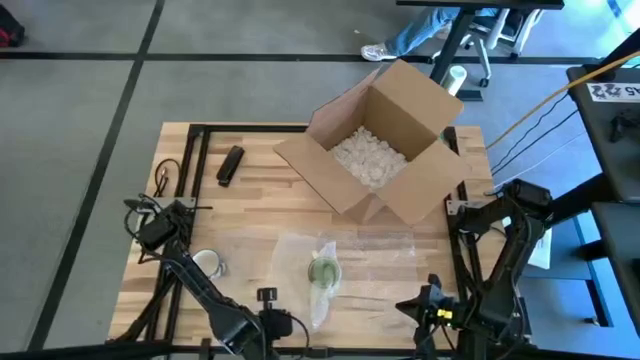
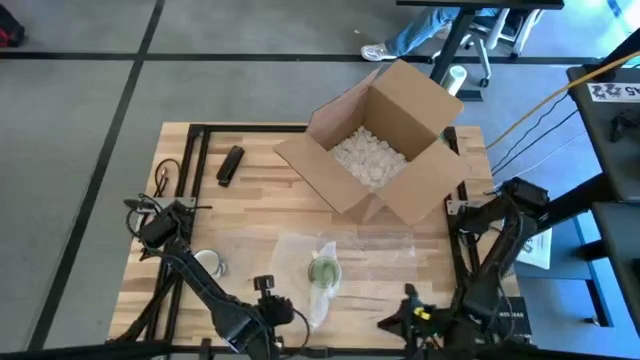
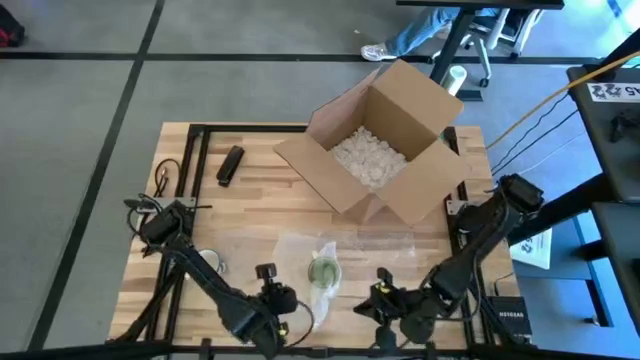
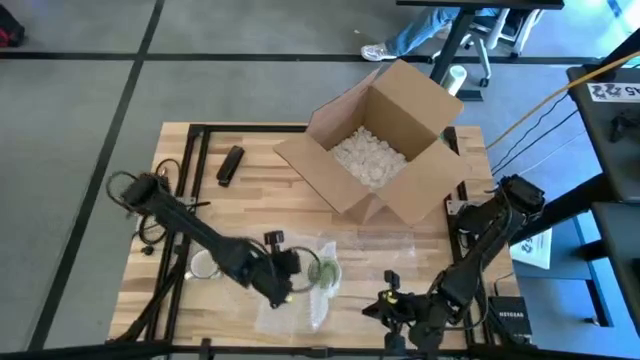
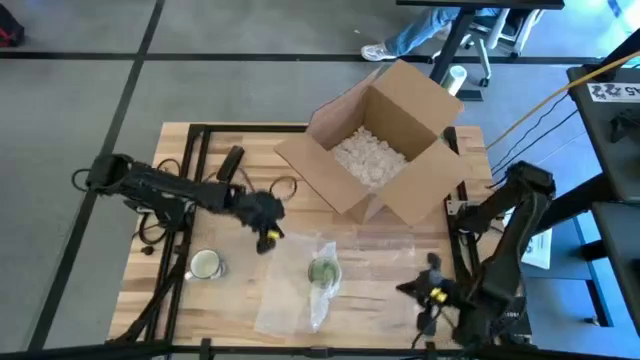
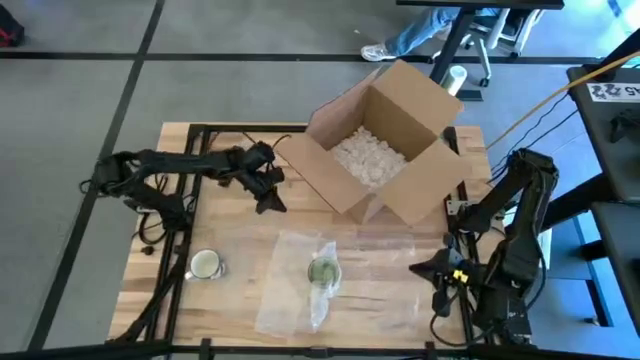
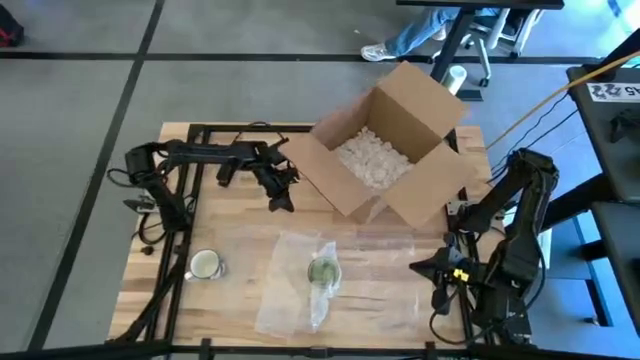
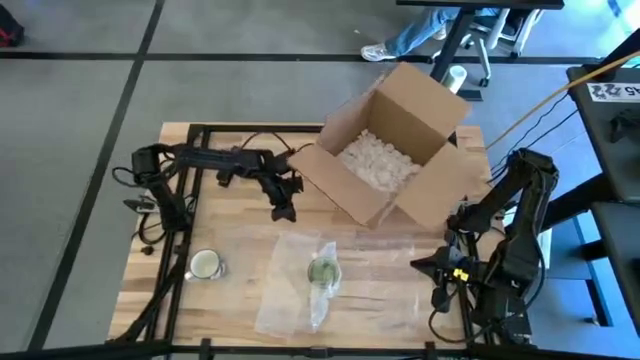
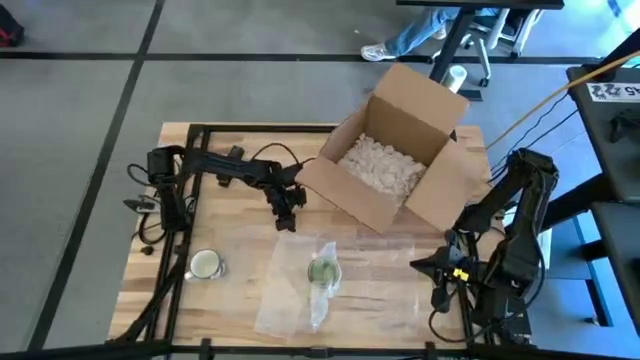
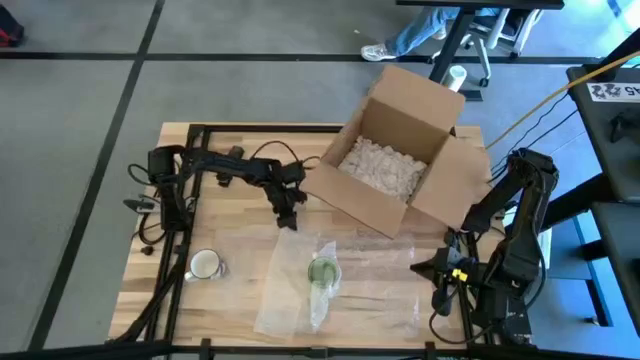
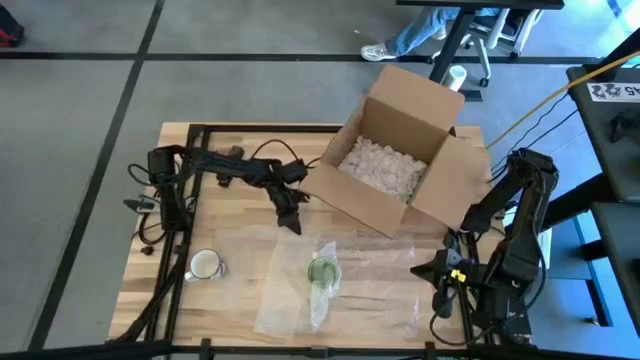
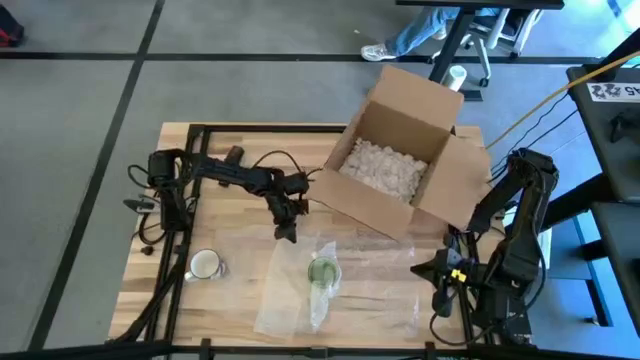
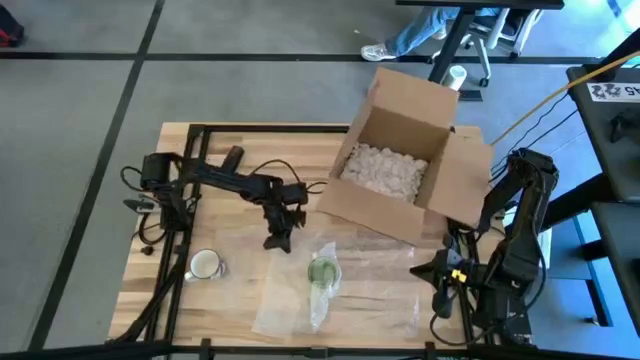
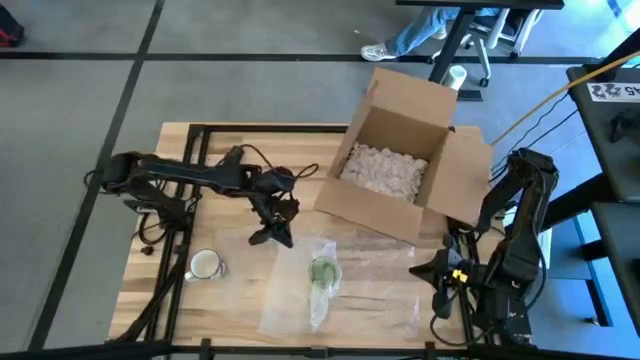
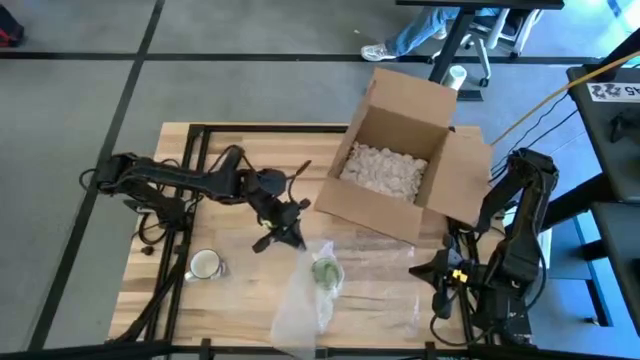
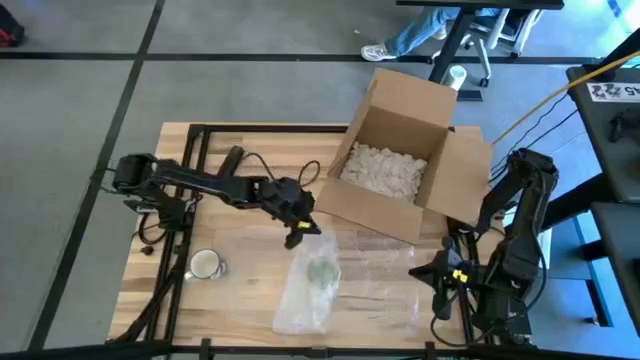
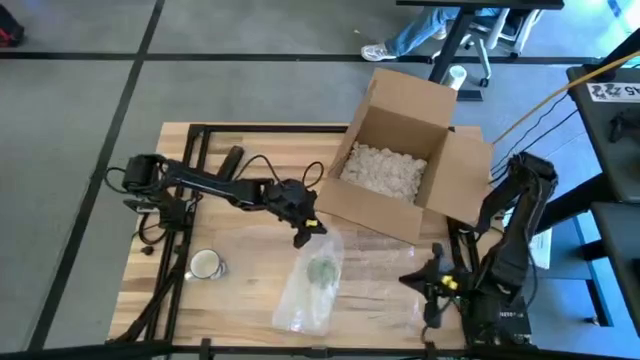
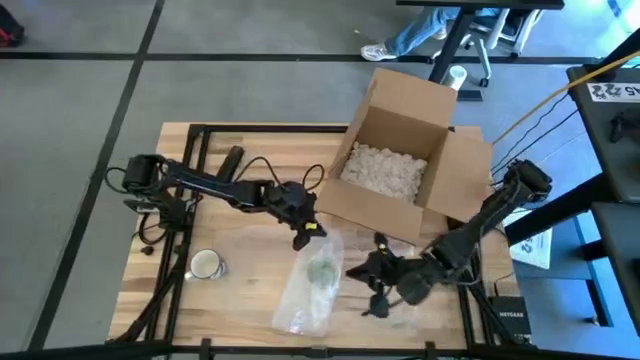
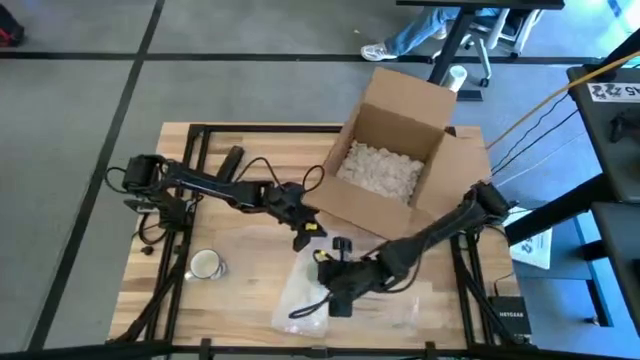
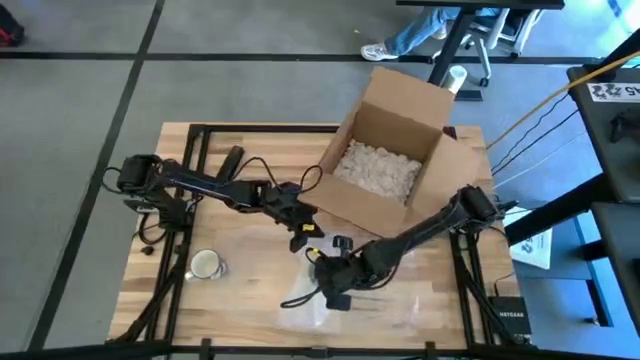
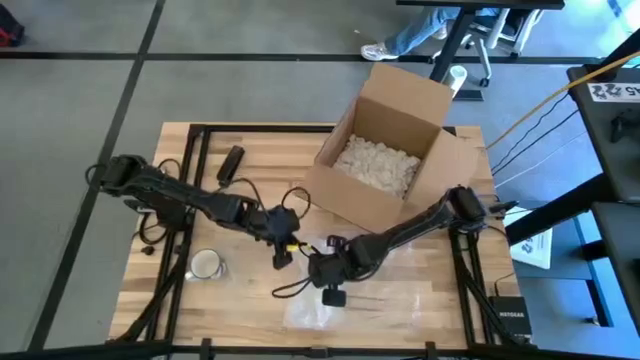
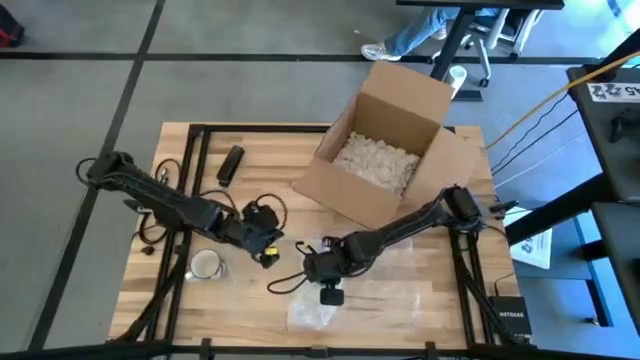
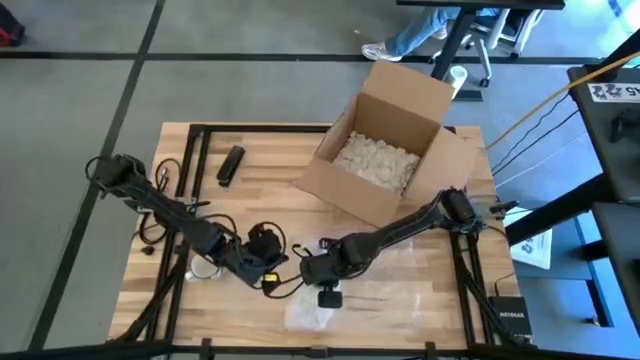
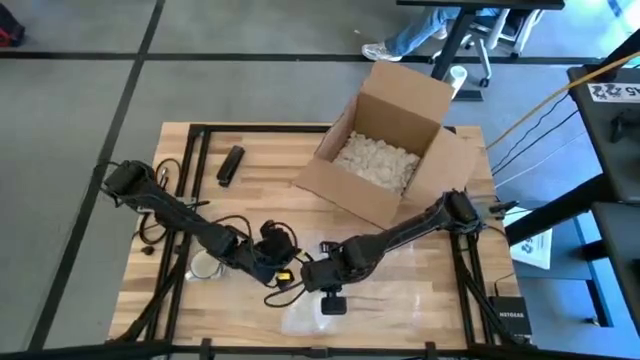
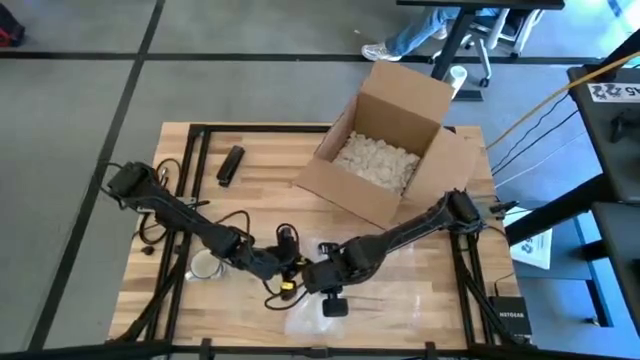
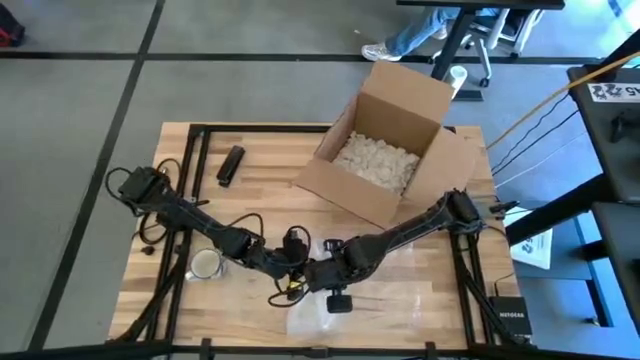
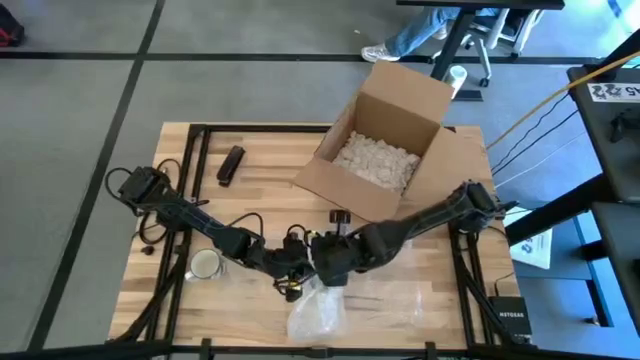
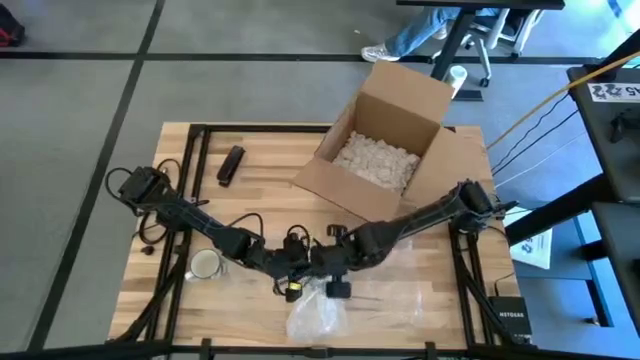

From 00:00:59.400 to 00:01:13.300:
Task: wrap mug
Wrap the green mug with bubble wrap

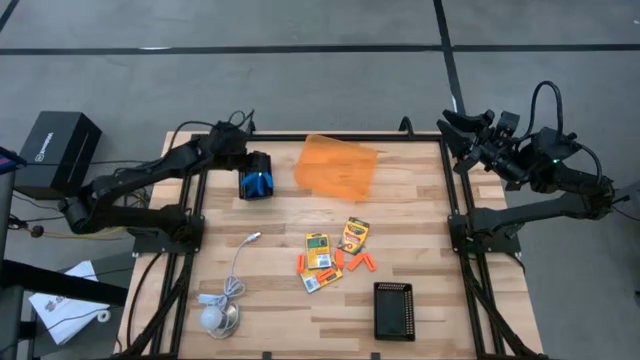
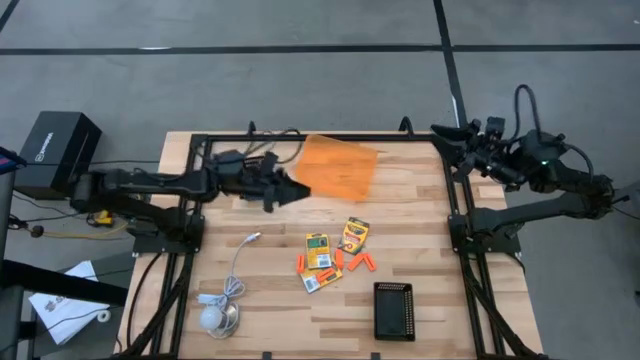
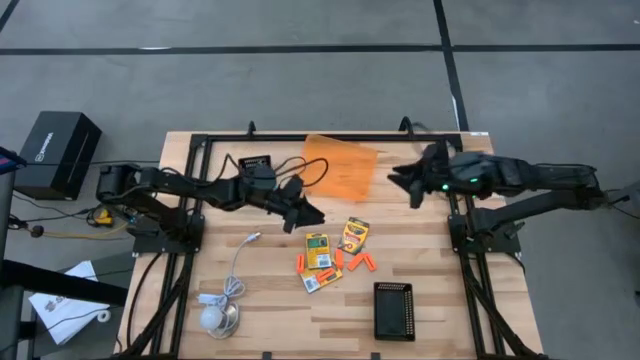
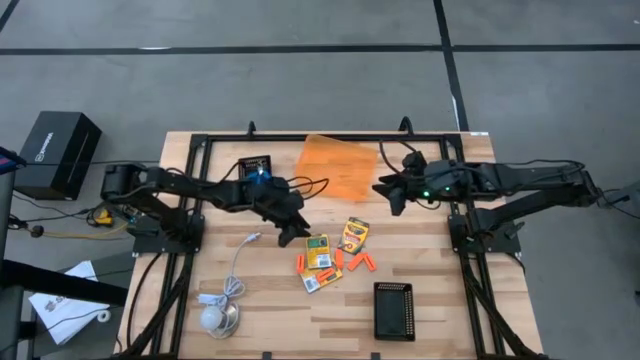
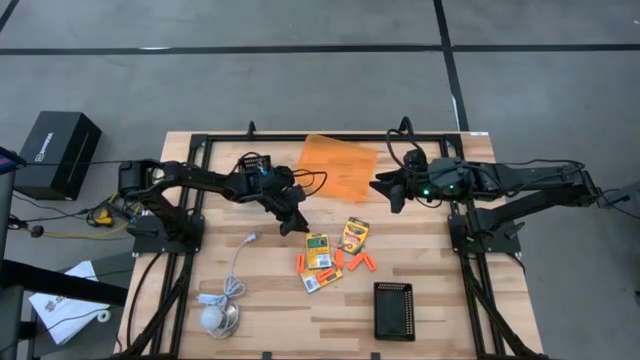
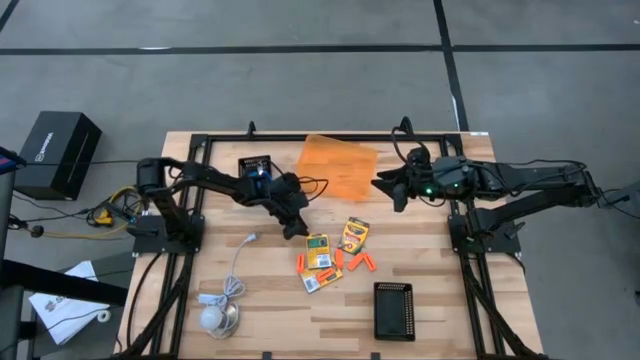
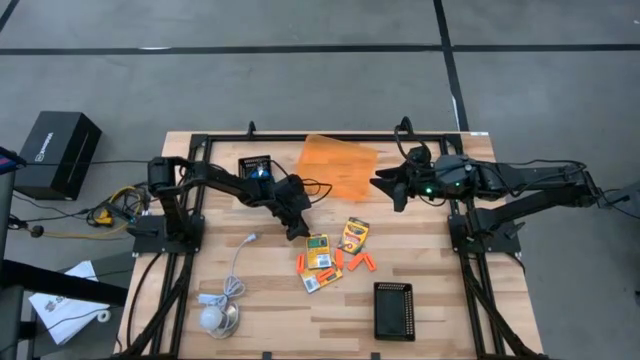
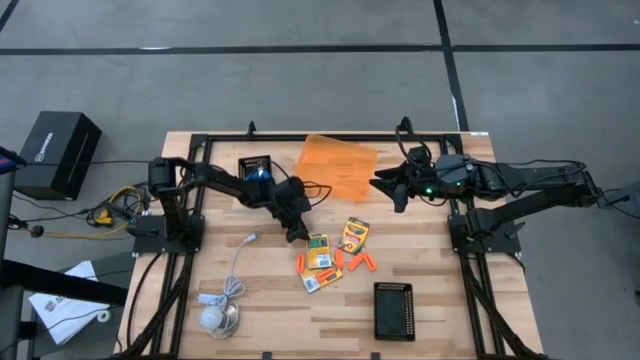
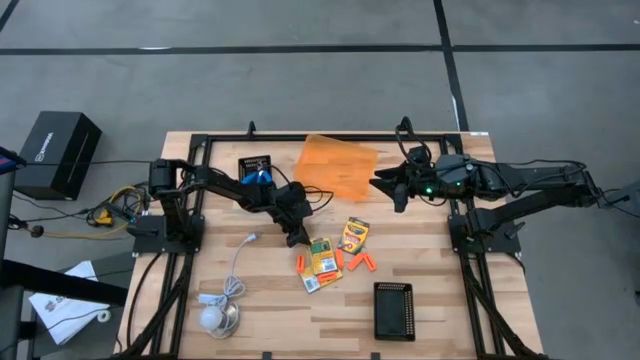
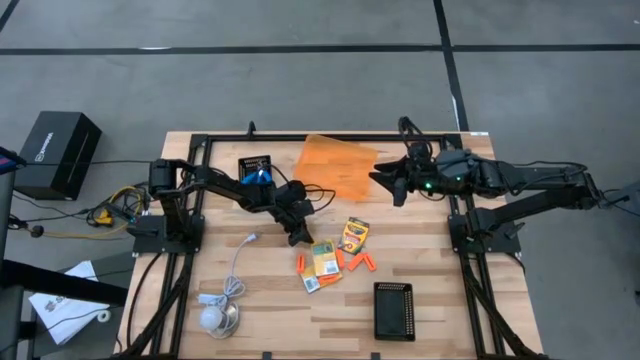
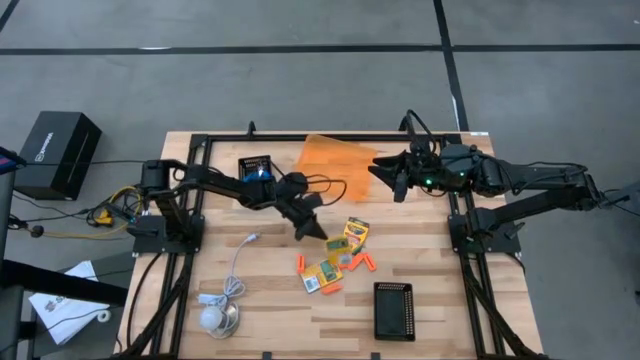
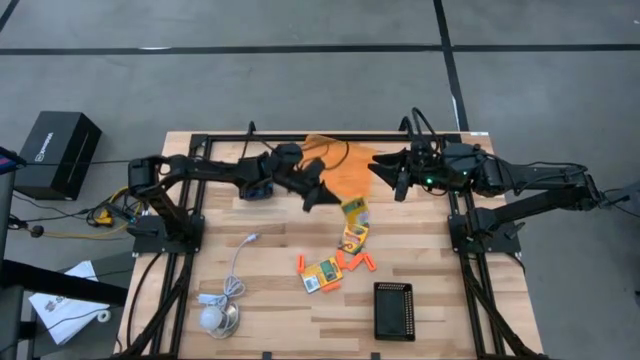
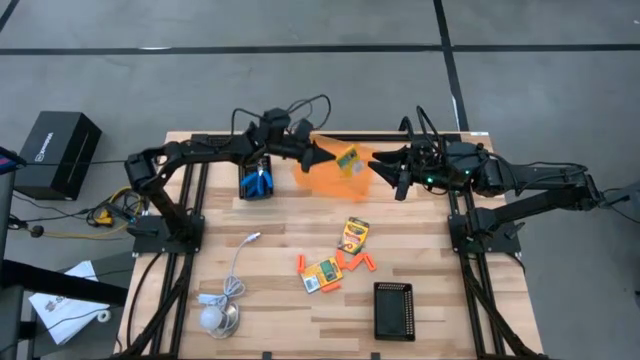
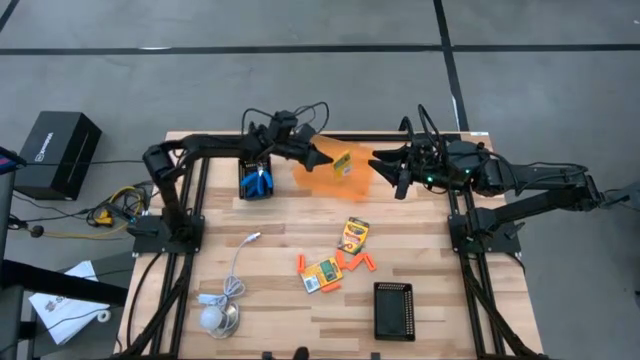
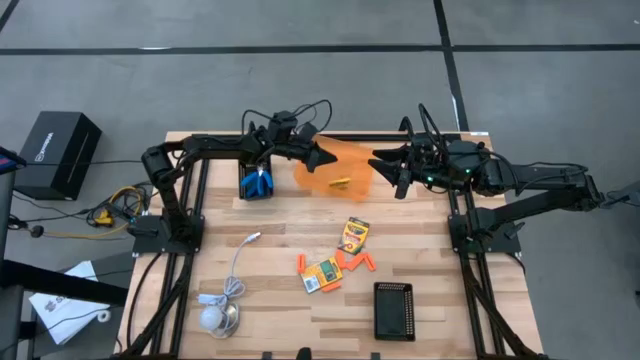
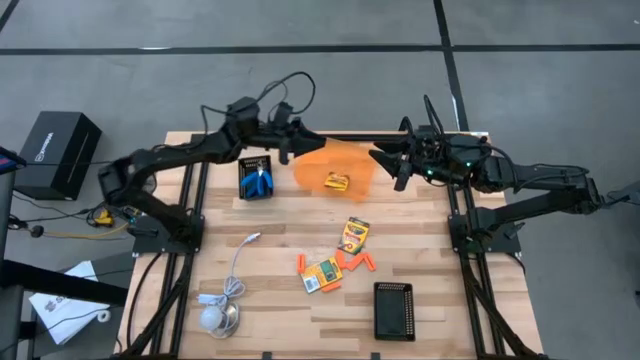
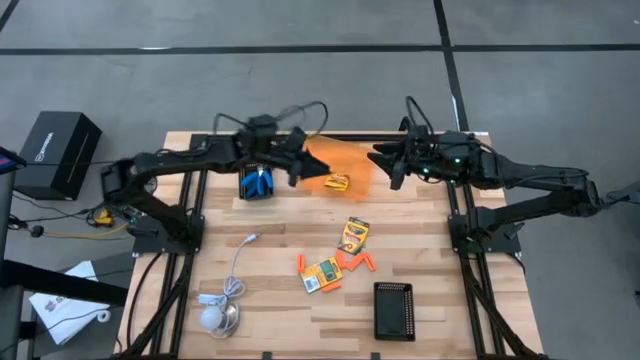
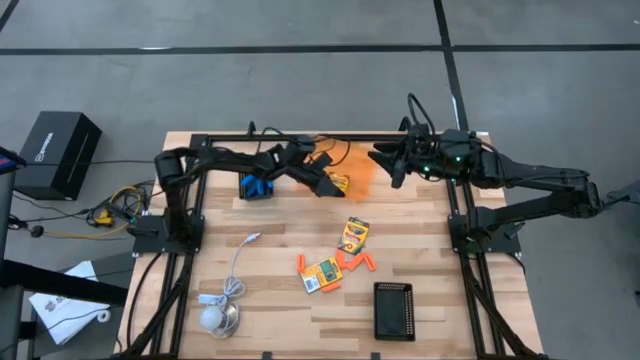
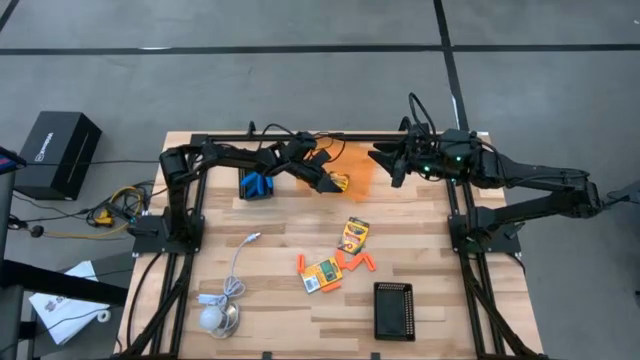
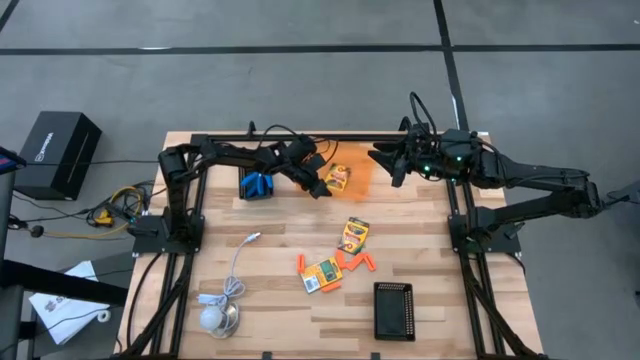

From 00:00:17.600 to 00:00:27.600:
Task: Pick & Place School Supplies
Put the crayon box into the orange bin
